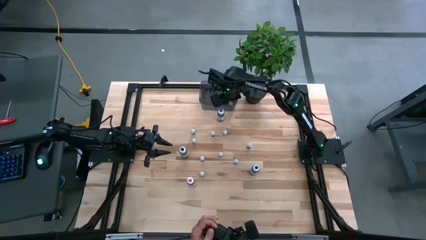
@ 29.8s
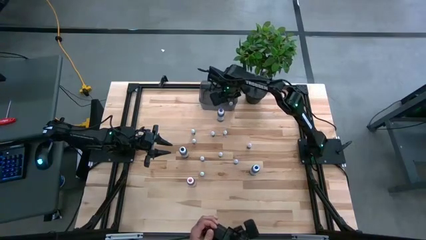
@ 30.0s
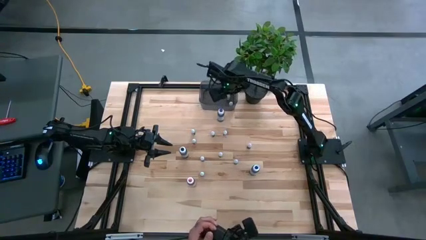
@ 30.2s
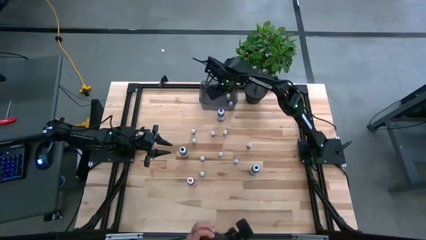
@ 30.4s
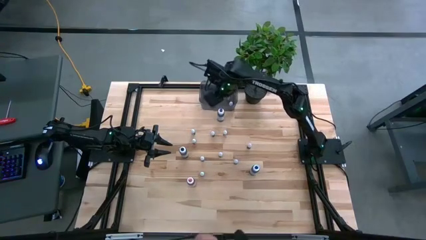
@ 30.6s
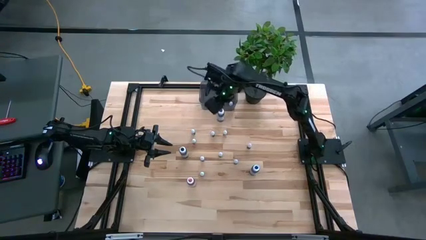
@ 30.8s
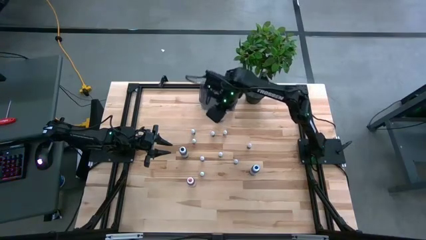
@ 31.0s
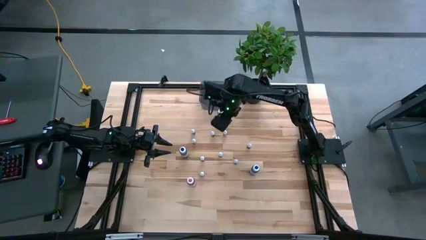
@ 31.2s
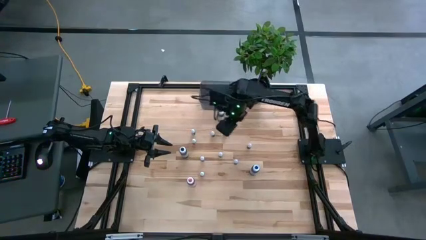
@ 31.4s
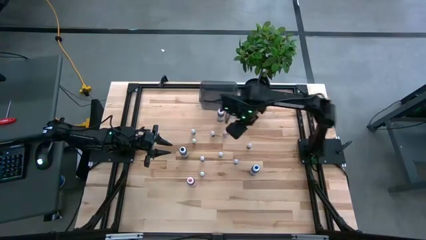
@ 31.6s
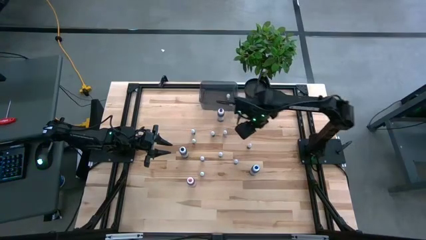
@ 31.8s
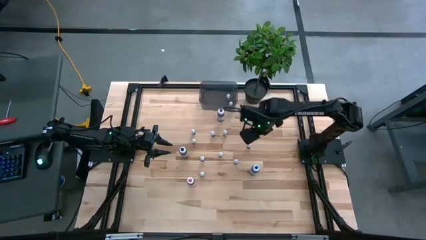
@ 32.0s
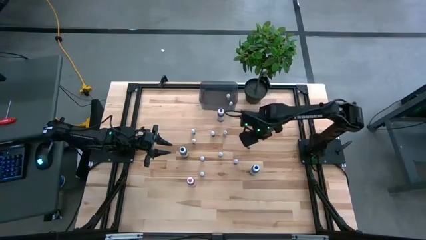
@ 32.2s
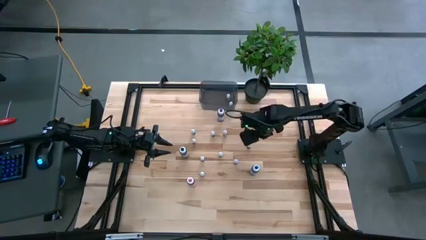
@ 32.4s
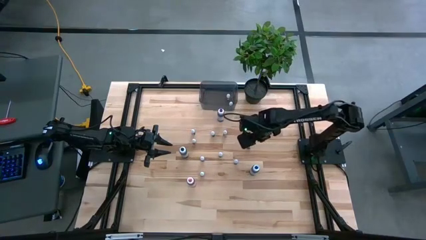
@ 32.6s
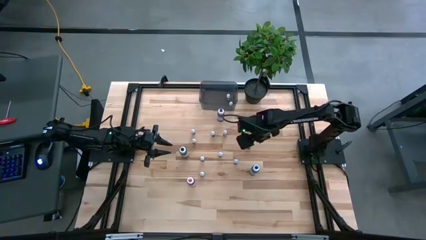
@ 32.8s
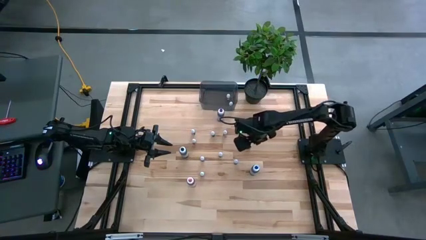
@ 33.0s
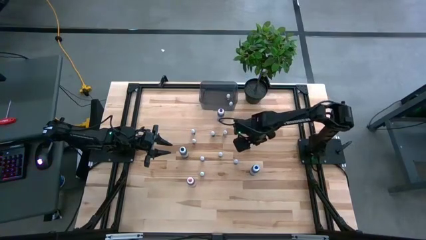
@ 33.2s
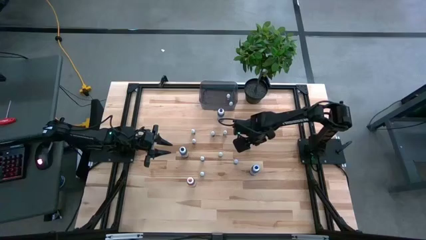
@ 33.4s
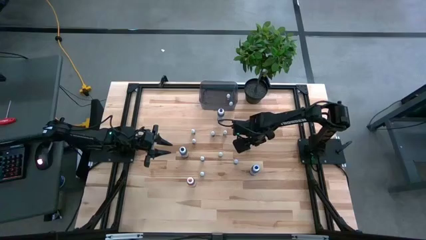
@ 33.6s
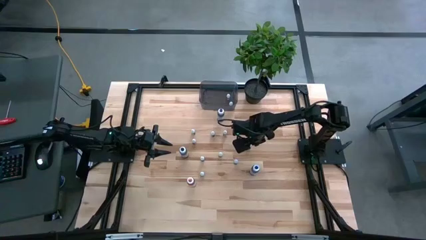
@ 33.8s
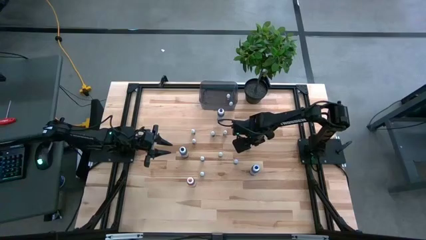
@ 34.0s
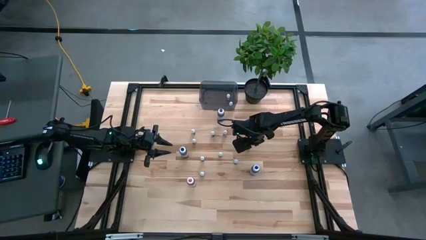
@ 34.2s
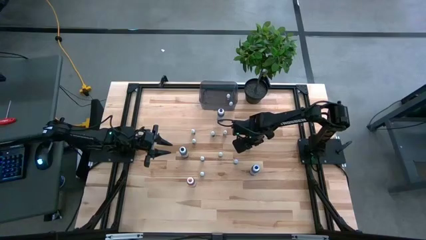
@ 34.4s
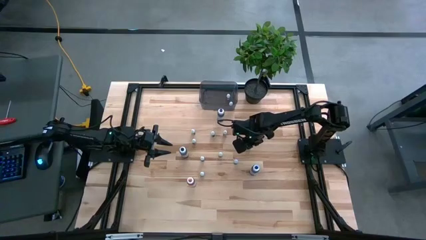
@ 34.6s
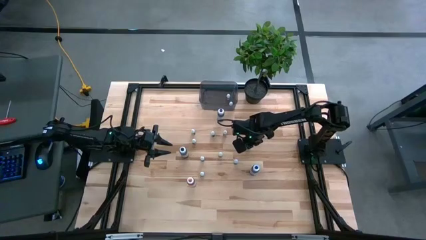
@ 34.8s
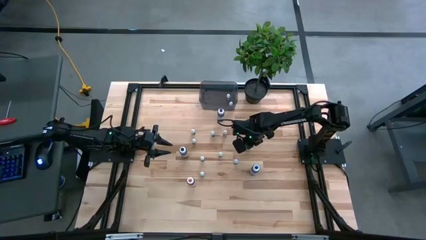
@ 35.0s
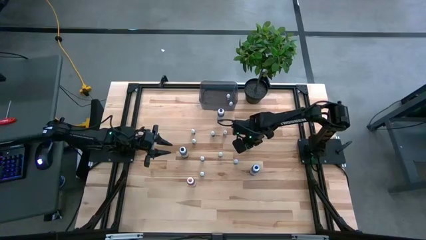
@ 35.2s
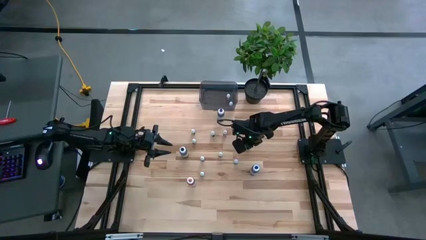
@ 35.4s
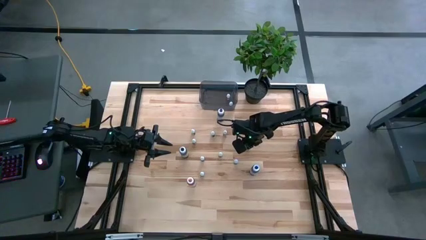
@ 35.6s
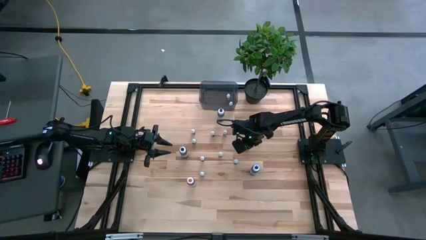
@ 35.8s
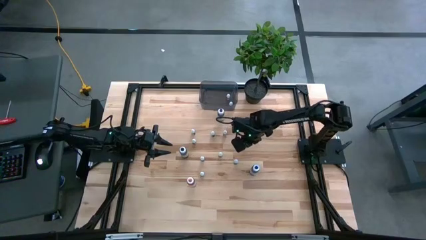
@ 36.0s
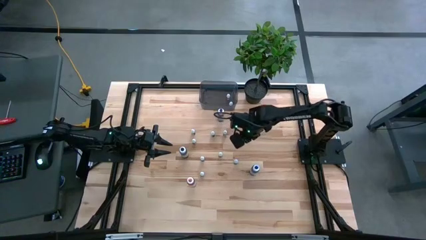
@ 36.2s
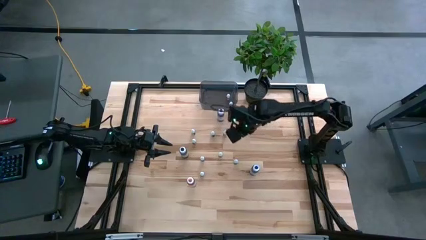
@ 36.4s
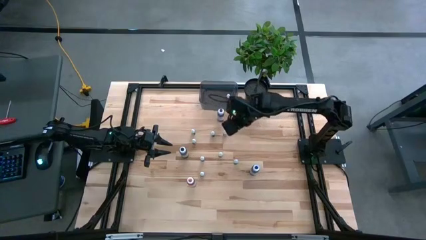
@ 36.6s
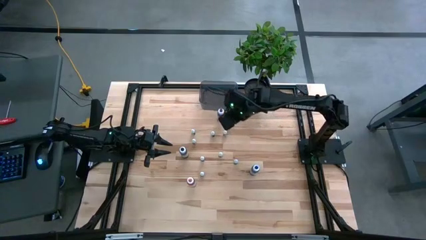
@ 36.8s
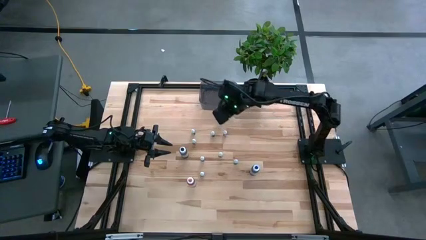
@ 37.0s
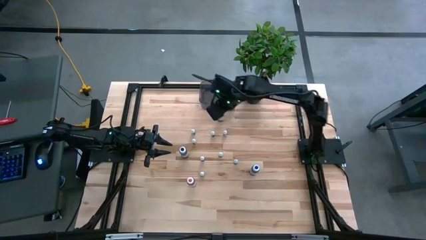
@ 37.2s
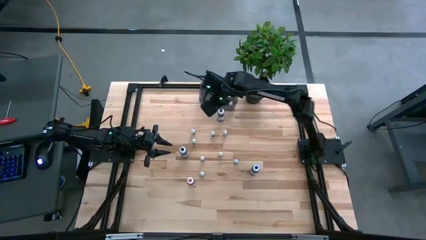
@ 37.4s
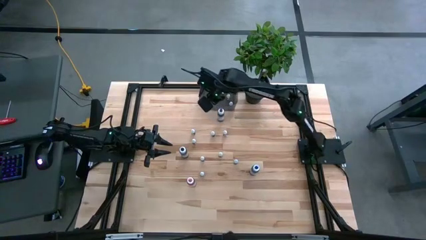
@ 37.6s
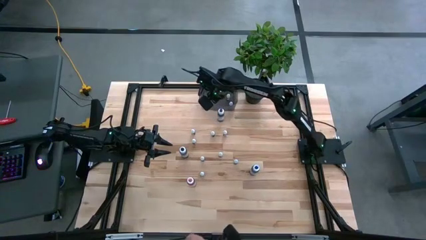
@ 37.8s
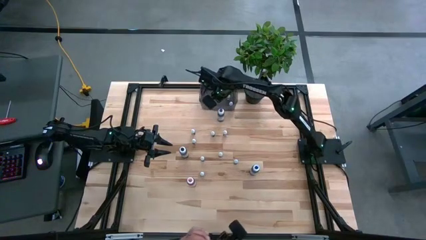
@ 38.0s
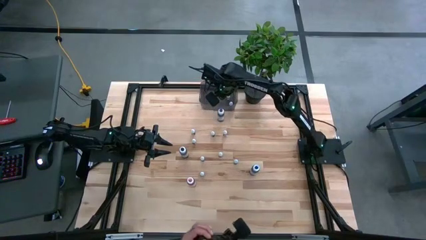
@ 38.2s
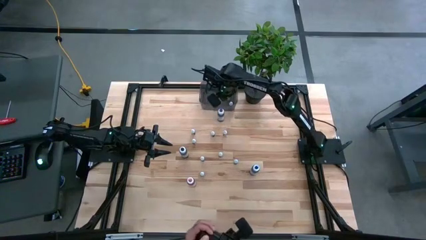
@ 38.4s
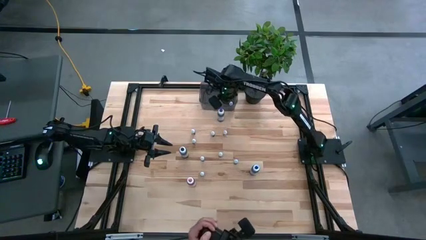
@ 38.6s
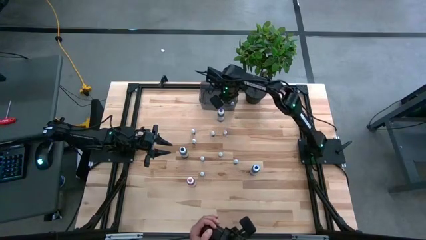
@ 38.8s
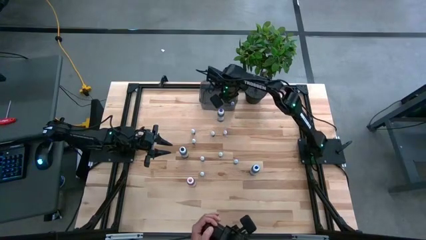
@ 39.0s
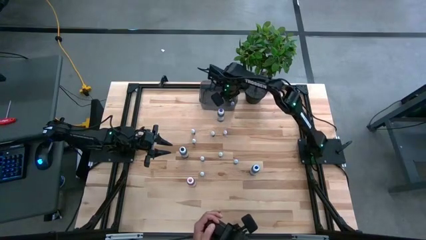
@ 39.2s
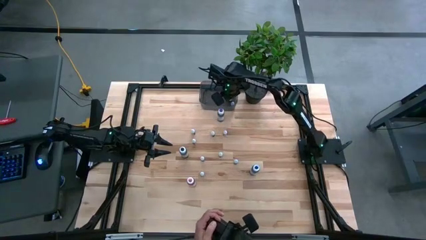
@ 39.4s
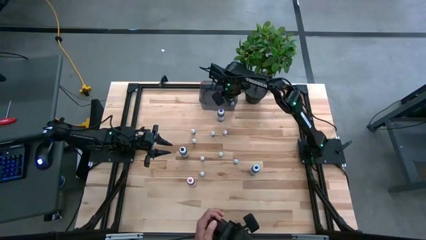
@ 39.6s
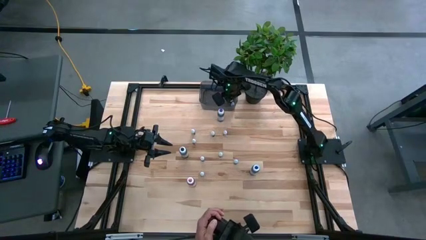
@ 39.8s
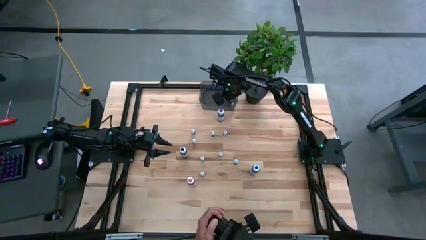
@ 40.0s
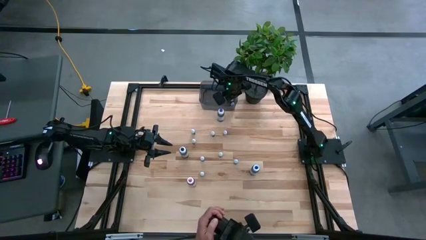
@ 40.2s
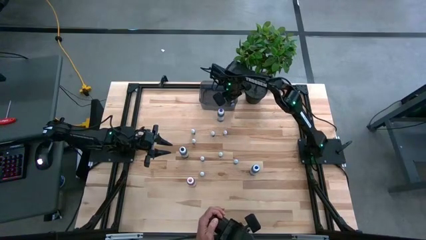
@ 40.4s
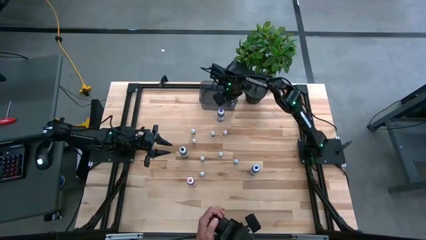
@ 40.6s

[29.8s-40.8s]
Task: Pick & Place food coloring
Put the right small black food coloring bottle into the black bin
